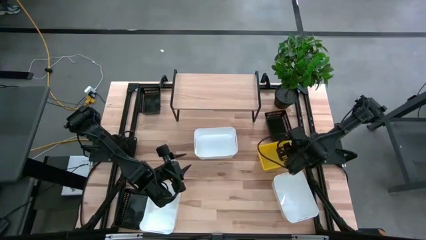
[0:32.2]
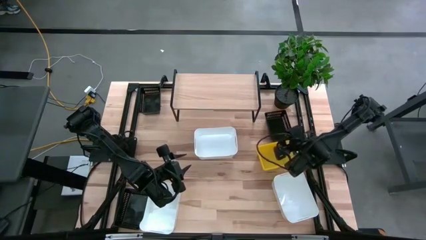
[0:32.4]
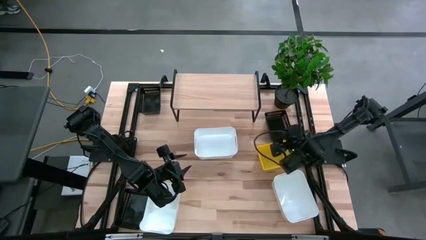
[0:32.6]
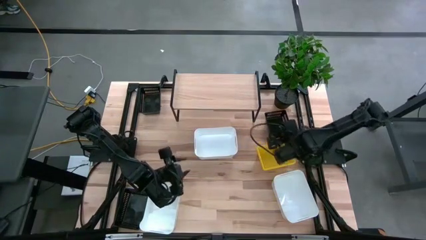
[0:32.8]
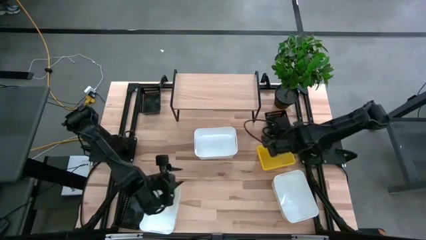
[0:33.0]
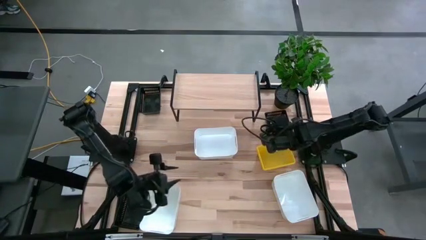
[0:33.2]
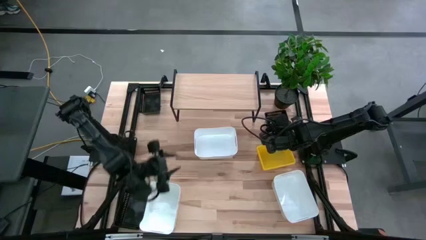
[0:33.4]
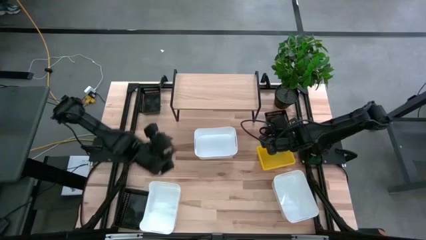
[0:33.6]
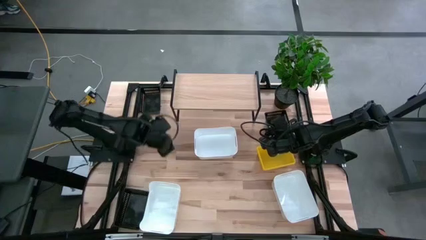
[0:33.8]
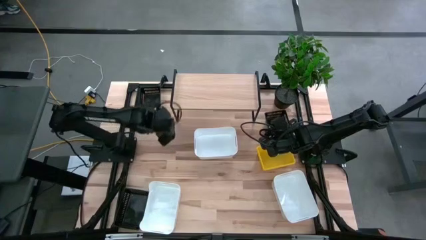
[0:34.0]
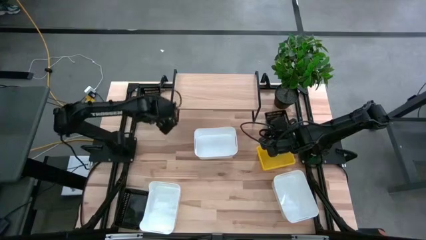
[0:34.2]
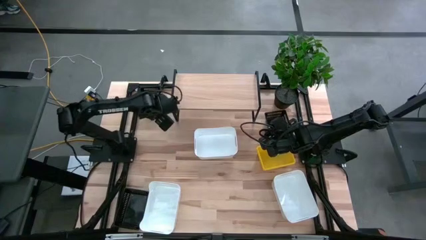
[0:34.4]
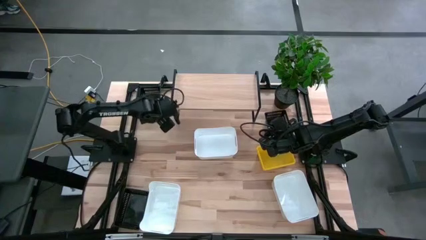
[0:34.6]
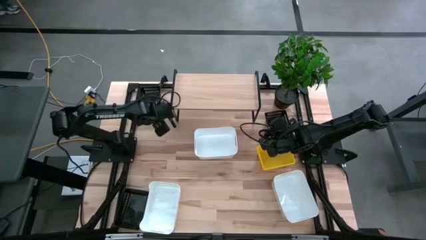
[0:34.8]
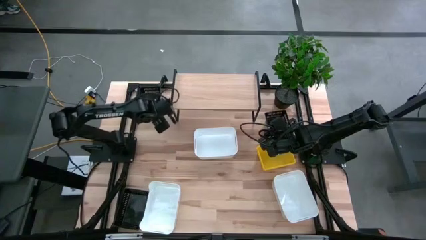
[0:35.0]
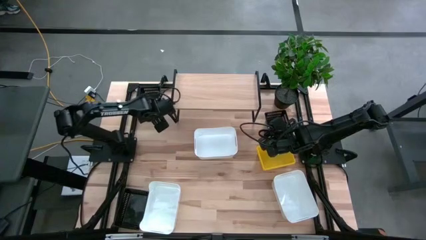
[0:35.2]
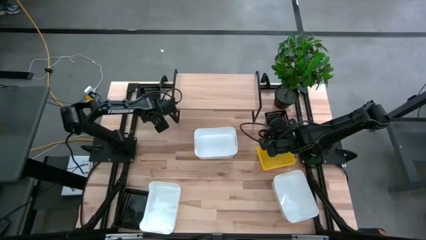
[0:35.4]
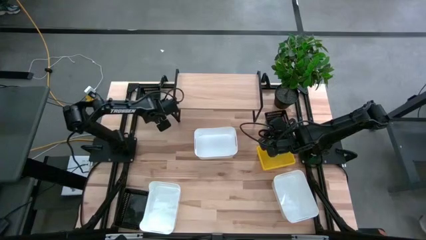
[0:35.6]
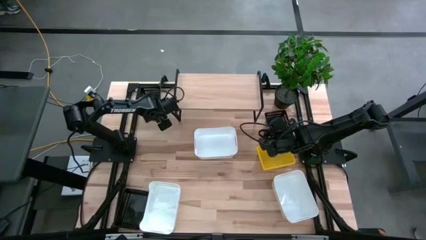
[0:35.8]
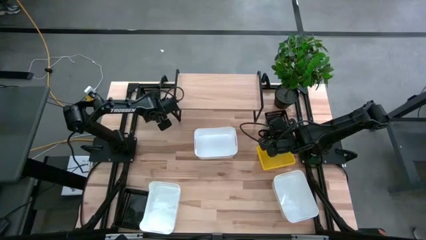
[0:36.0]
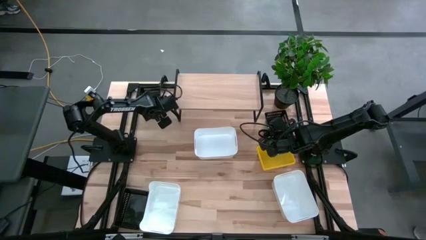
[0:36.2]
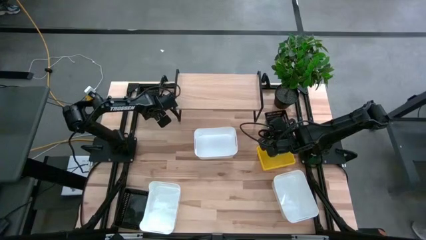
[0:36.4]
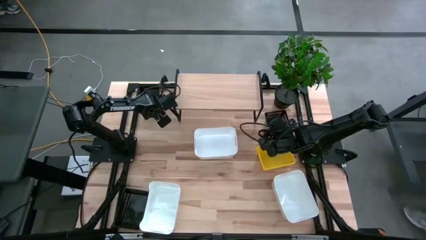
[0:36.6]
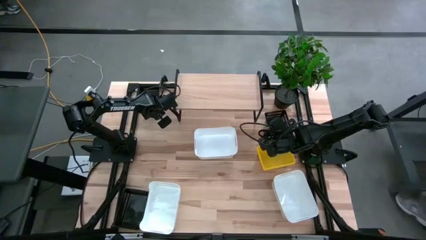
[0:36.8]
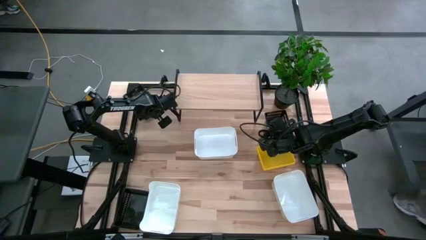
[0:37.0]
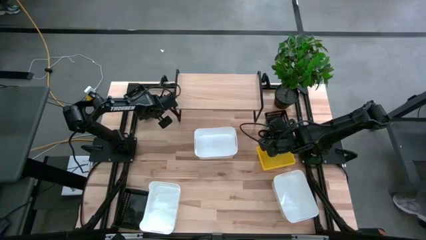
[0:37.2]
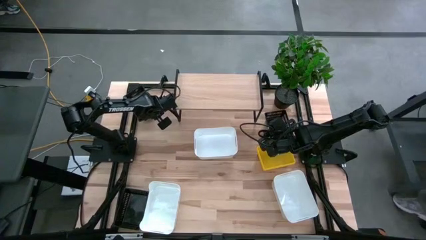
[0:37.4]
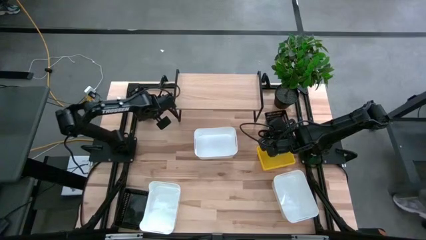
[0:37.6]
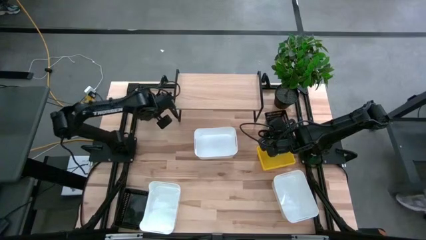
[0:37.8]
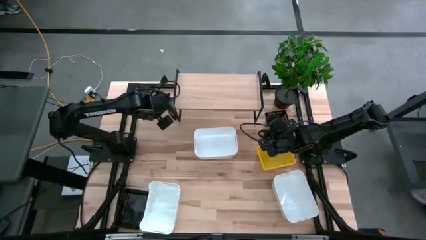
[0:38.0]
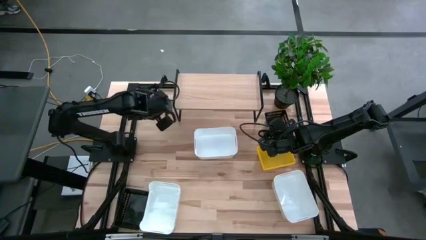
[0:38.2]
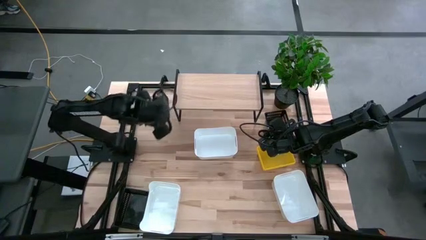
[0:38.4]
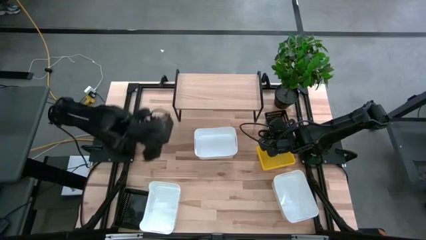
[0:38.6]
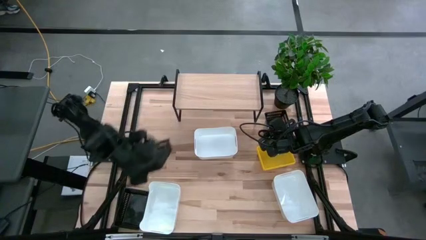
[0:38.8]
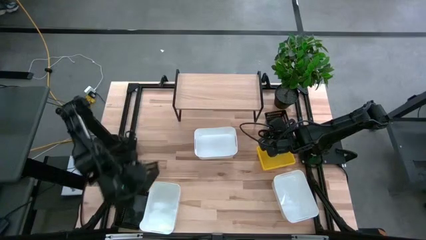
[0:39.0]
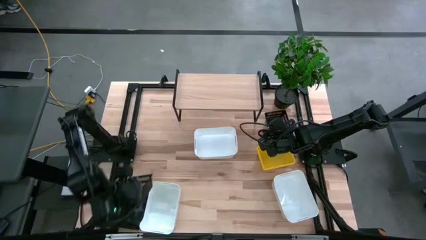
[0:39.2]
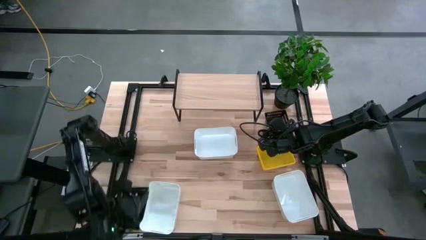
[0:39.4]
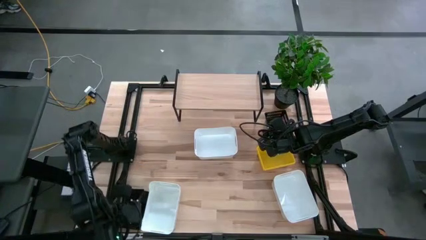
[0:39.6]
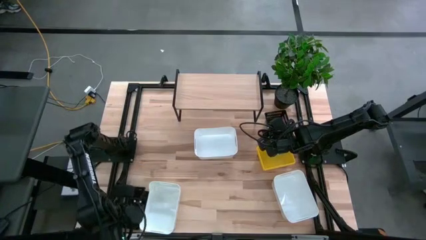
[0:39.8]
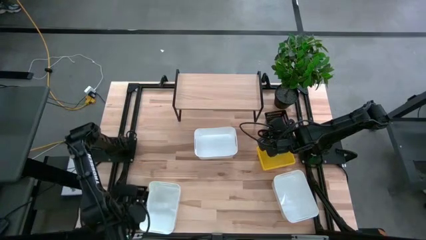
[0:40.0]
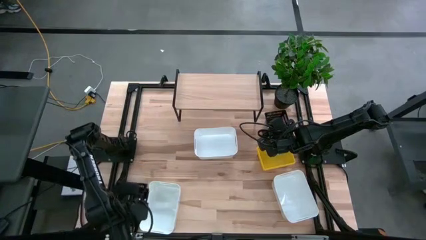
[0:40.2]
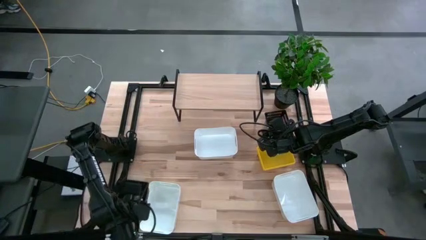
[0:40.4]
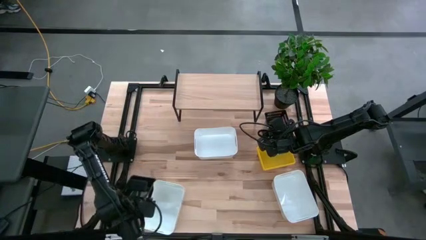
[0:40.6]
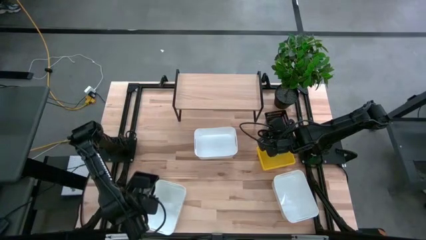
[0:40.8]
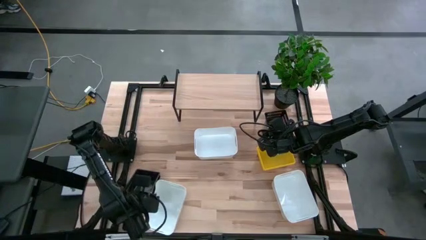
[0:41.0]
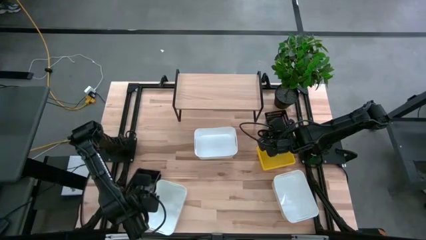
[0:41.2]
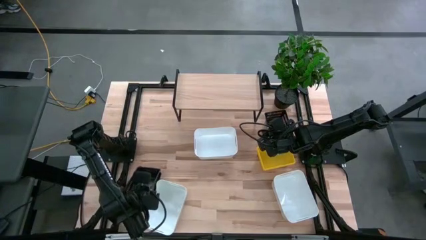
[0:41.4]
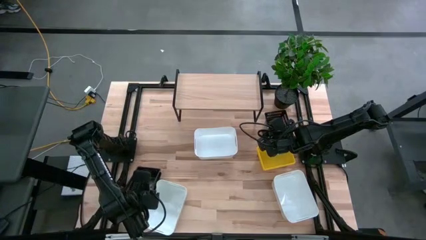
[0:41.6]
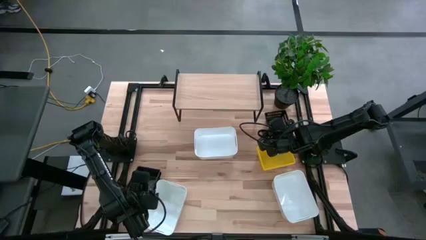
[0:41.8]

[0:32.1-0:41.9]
Task: Stack baskets on shelf by color
Stack the top left black bin on top of the bottom left black bin

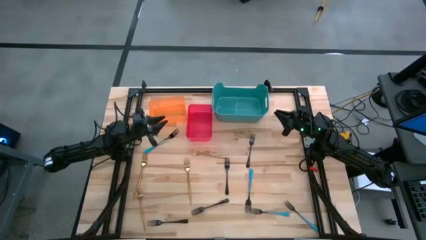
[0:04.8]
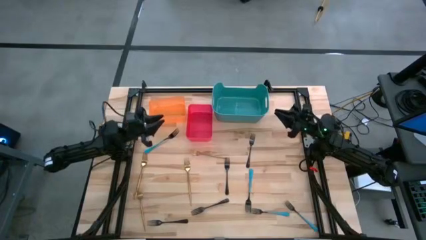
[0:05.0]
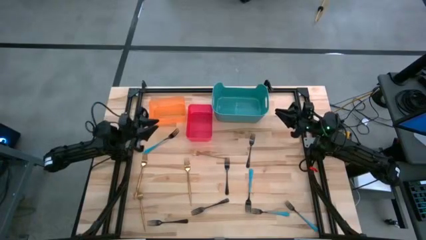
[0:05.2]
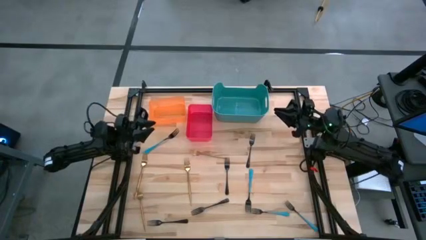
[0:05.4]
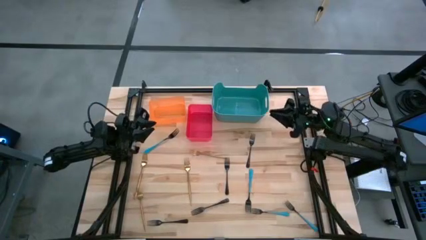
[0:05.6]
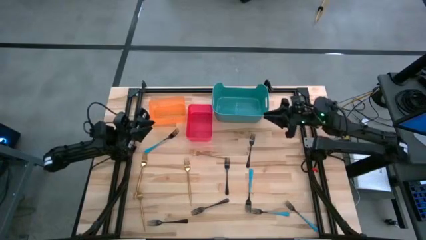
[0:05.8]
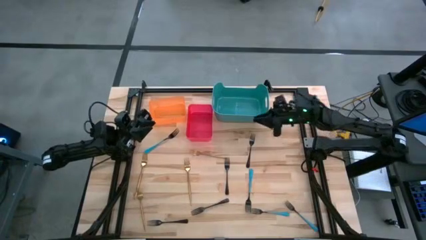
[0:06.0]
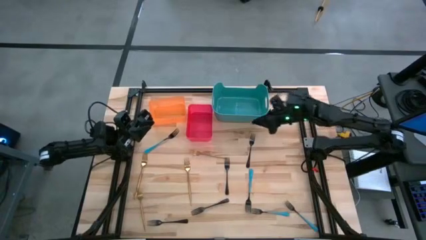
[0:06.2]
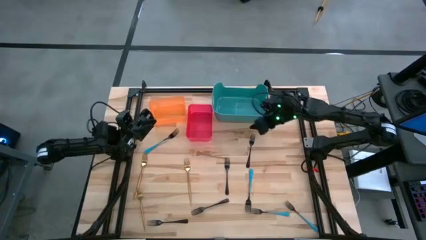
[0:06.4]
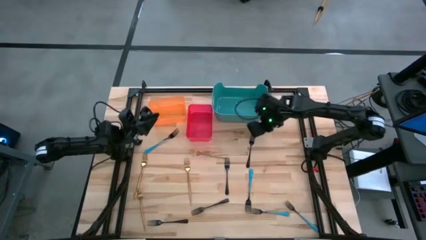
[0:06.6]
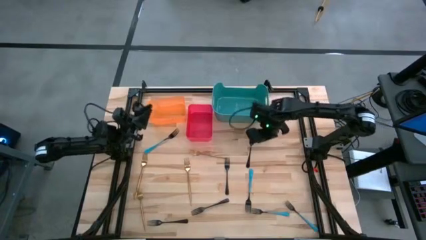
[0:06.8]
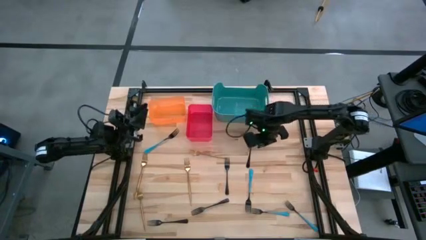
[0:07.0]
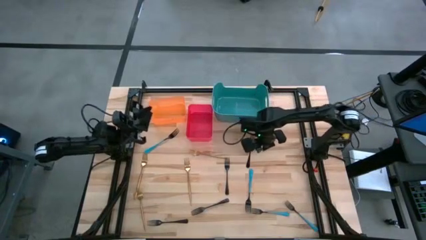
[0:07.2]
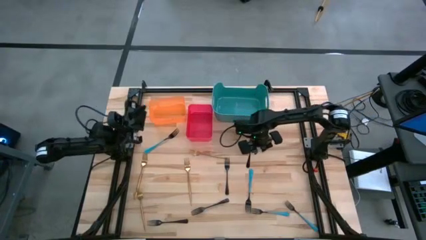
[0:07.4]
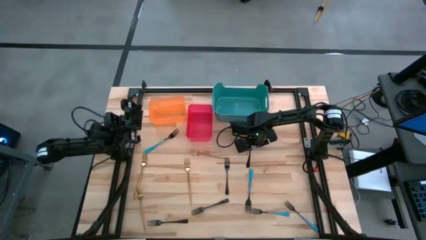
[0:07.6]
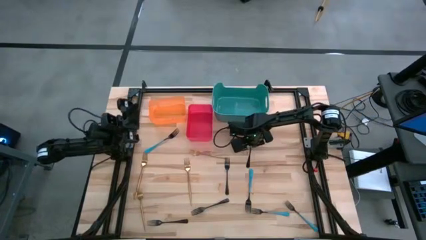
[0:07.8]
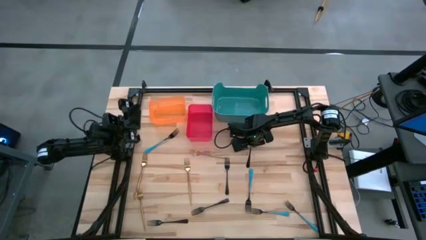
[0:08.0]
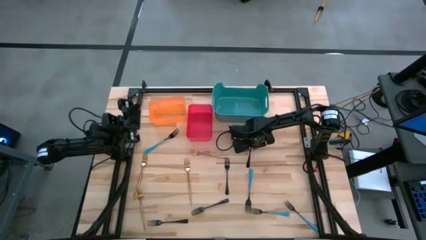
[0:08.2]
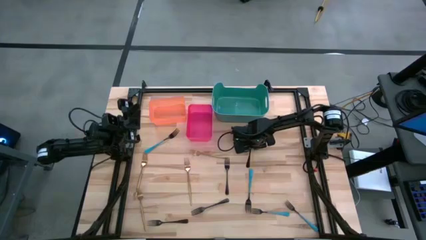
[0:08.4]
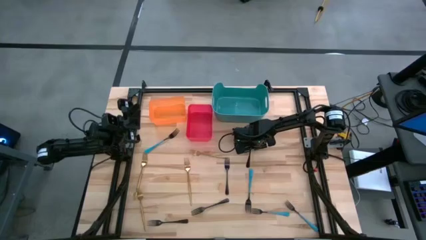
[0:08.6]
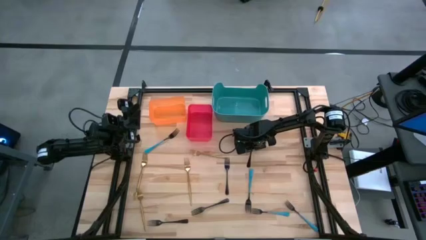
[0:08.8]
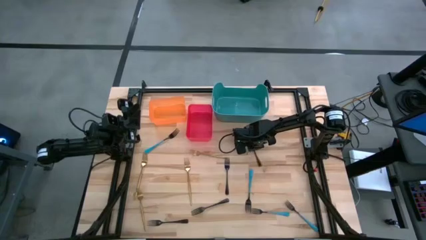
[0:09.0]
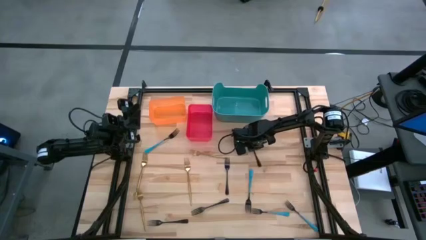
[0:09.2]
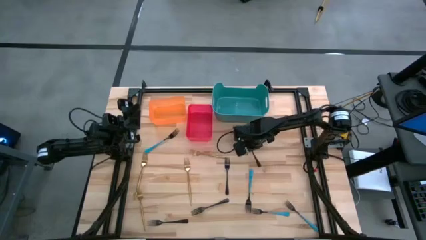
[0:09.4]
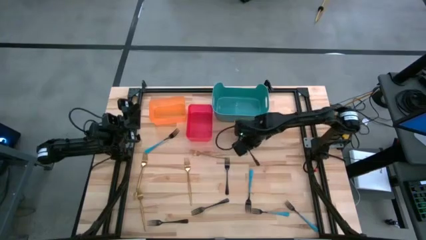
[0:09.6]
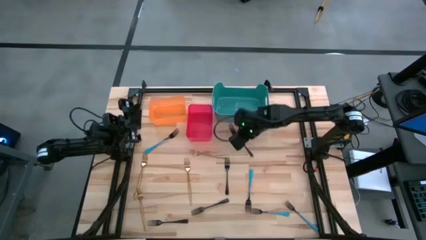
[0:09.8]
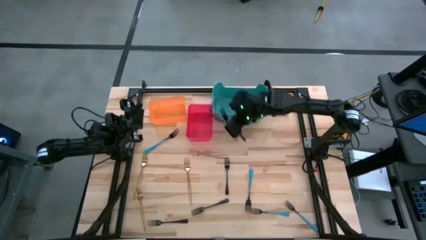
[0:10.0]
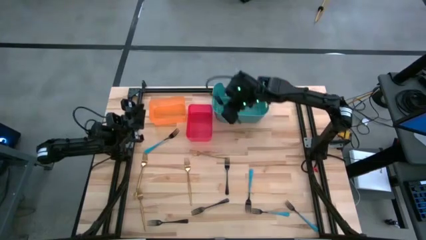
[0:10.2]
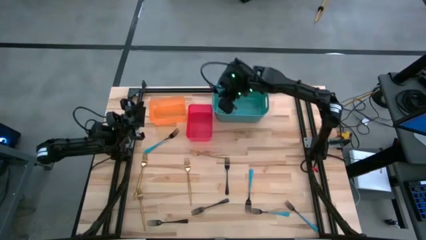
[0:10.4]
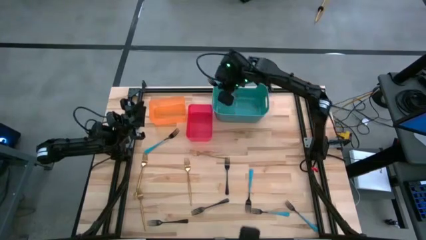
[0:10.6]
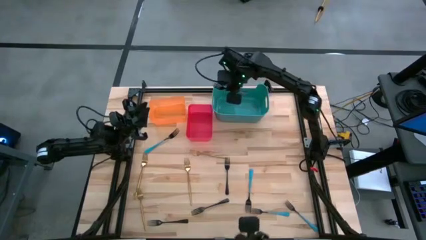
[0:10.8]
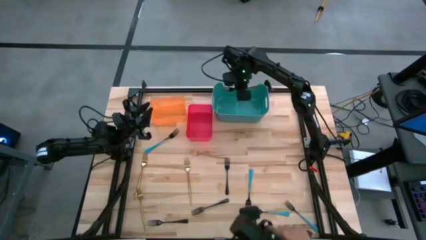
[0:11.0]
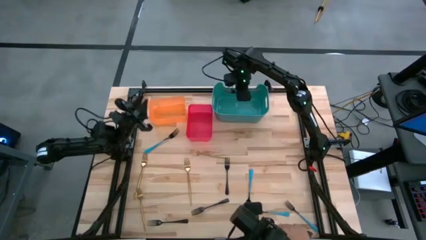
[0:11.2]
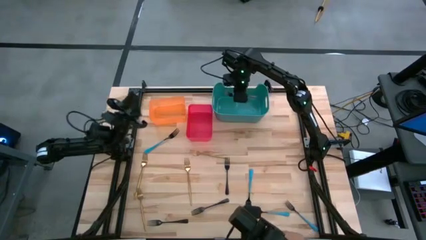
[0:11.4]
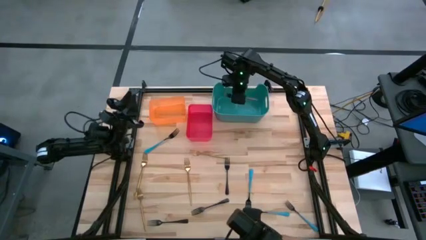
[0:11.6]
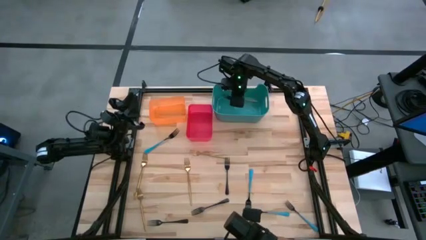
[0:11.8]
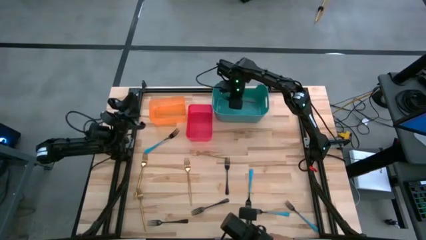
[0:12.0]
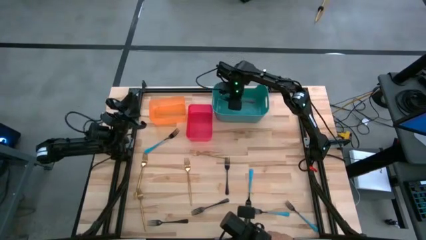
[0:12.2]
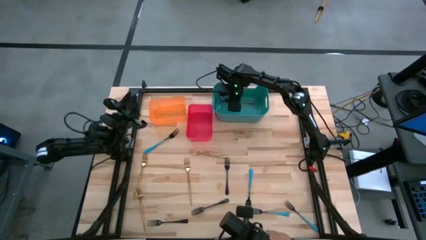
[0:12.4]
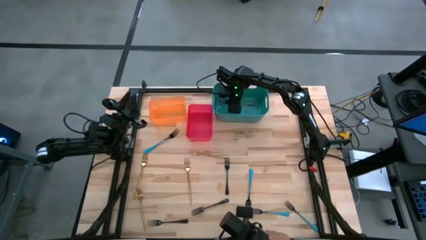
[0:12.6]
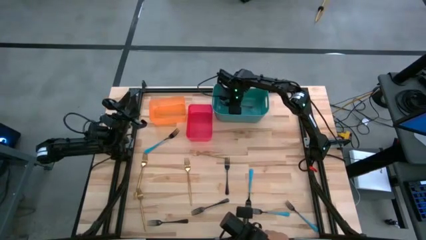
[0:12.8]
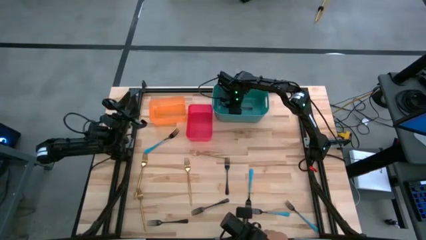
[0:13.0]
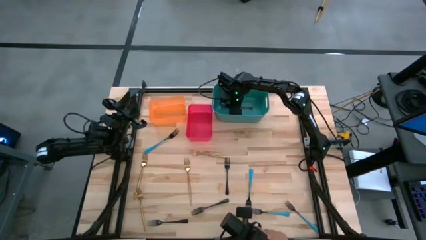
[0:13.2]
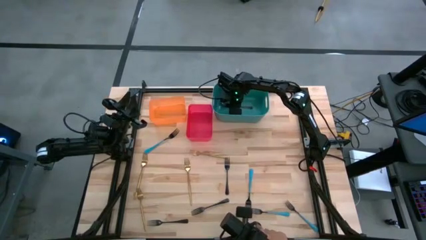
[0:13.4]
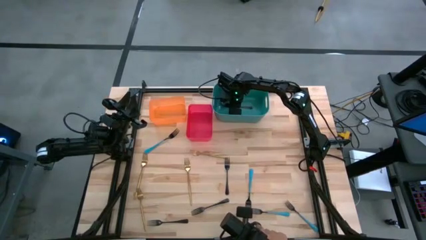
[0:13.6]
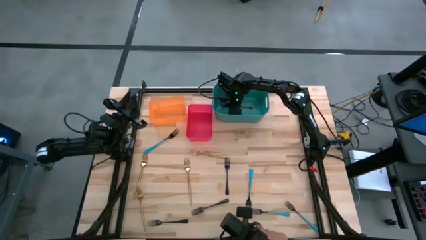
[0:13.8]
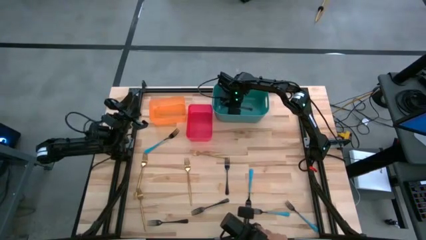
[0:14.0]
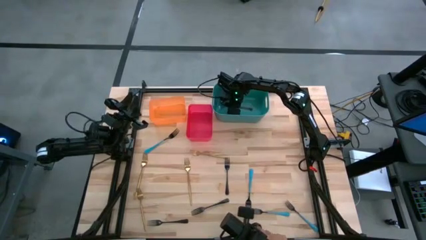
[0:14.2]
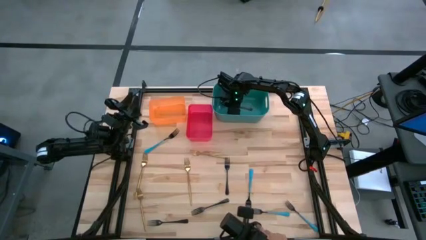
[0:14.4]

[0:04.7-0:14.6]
Task: Sort silverware by color (type)
Put the black fork into the green bin
